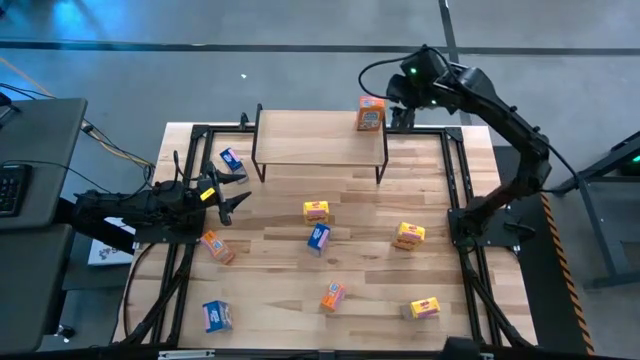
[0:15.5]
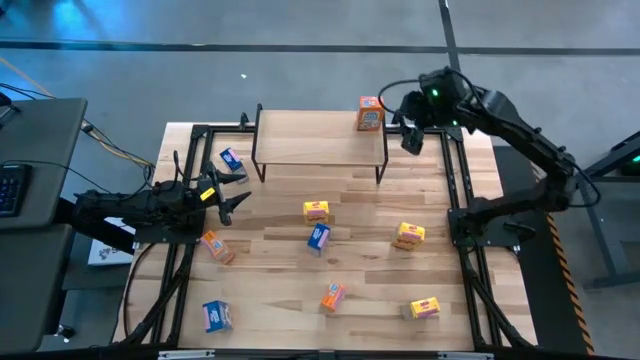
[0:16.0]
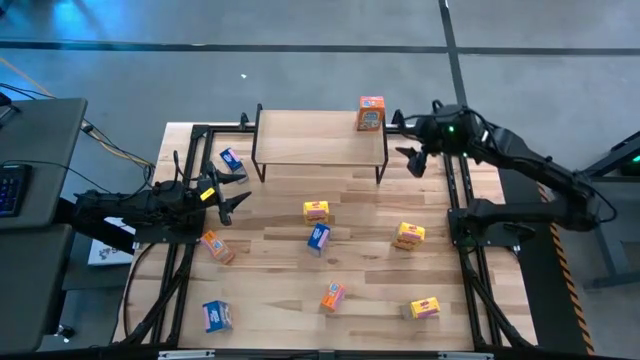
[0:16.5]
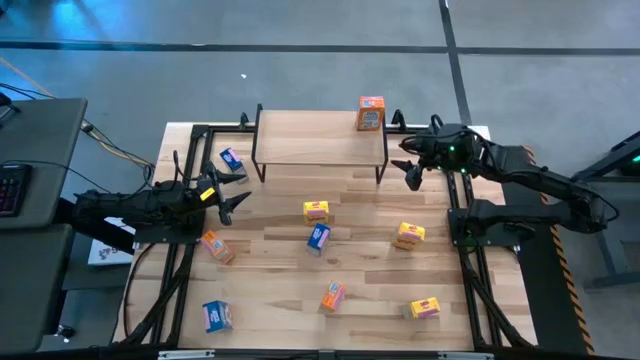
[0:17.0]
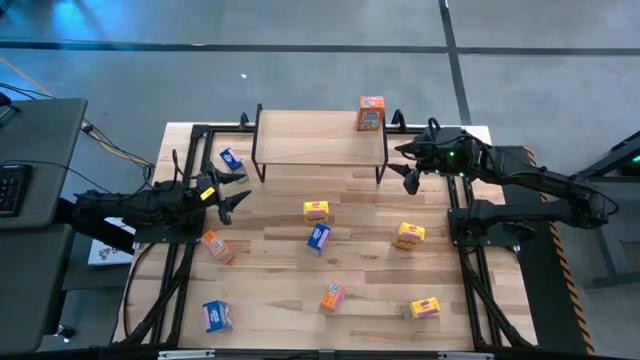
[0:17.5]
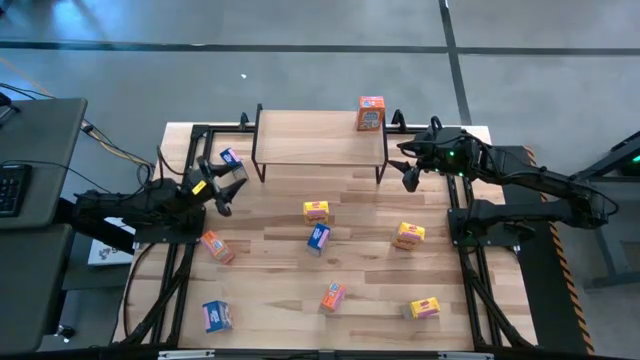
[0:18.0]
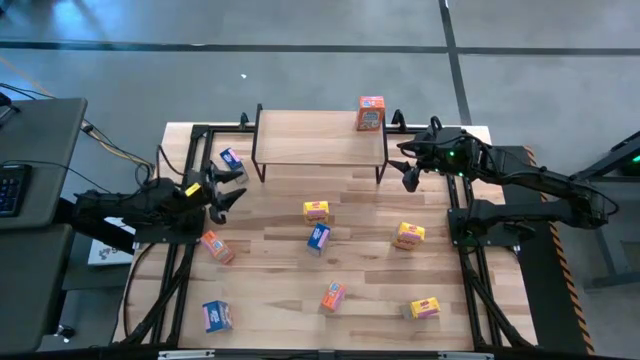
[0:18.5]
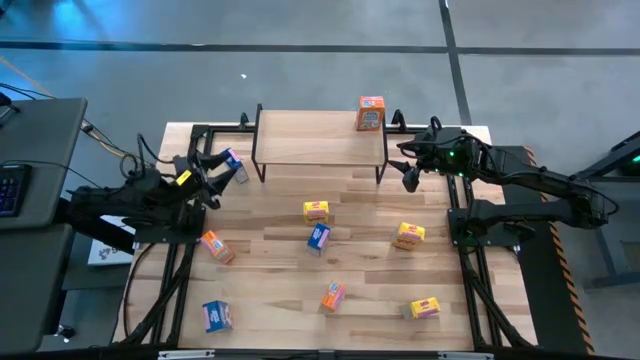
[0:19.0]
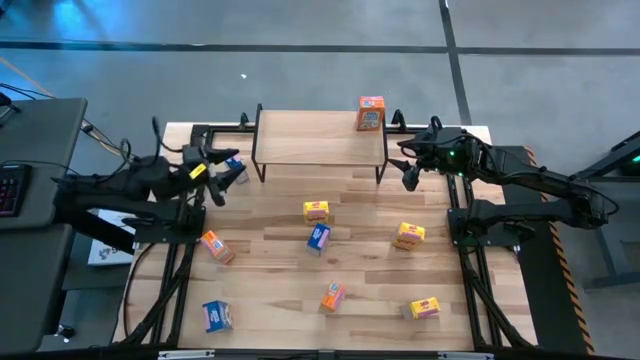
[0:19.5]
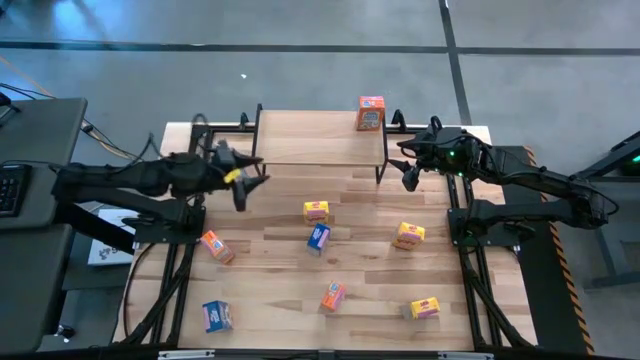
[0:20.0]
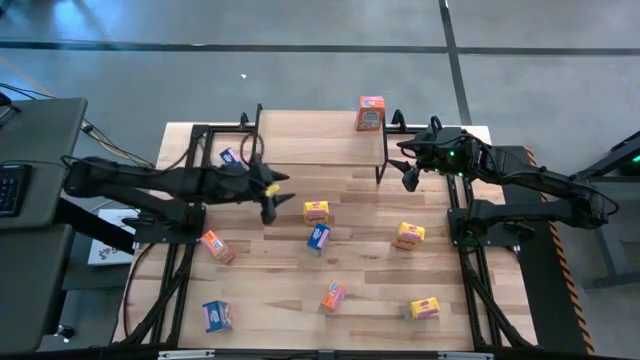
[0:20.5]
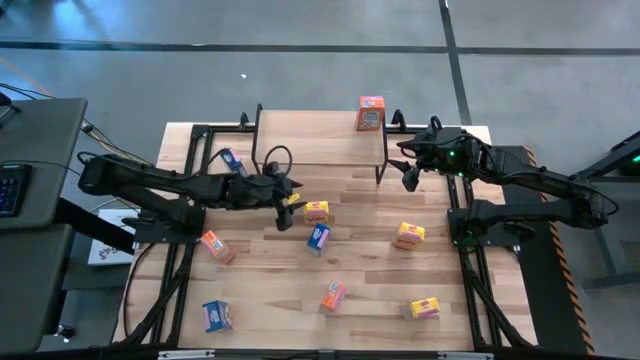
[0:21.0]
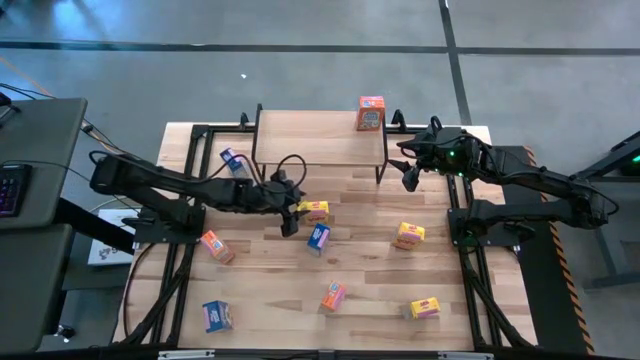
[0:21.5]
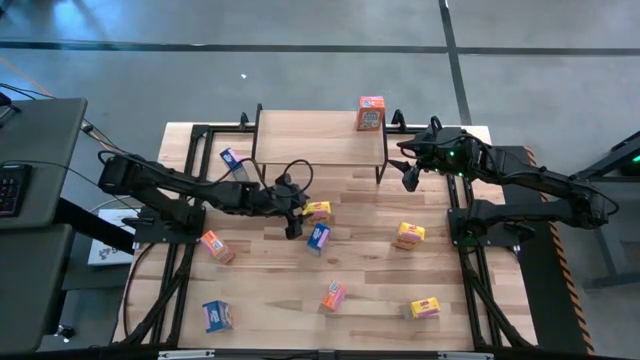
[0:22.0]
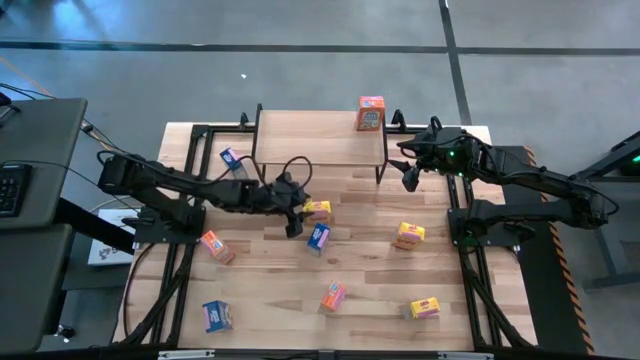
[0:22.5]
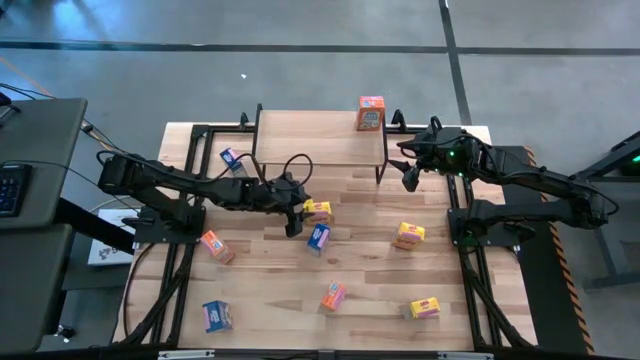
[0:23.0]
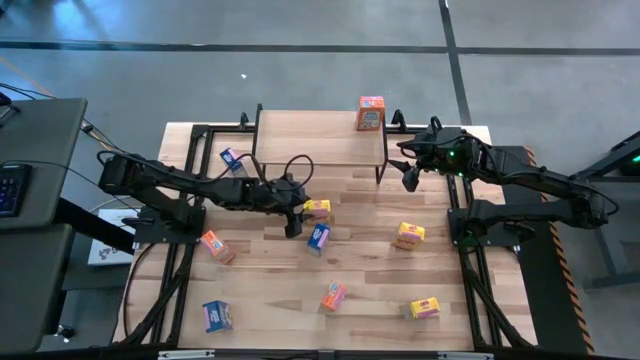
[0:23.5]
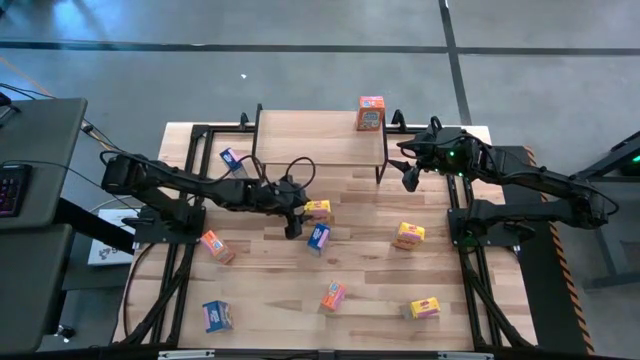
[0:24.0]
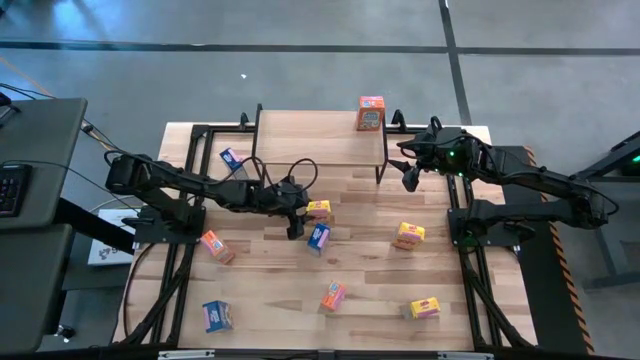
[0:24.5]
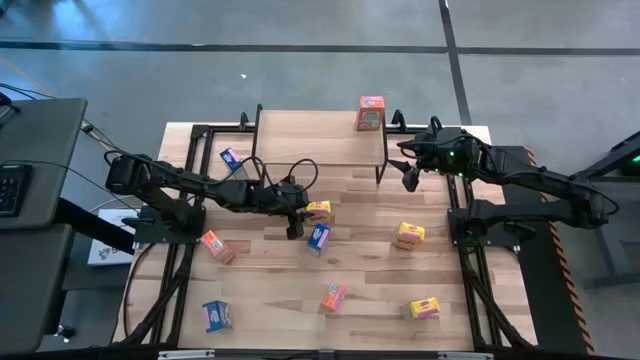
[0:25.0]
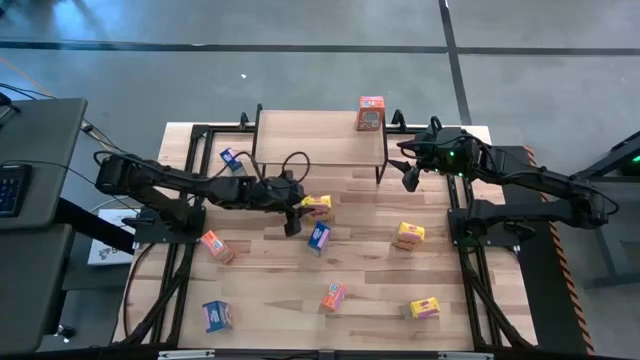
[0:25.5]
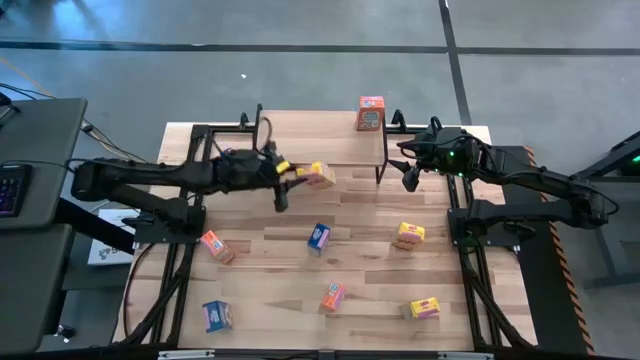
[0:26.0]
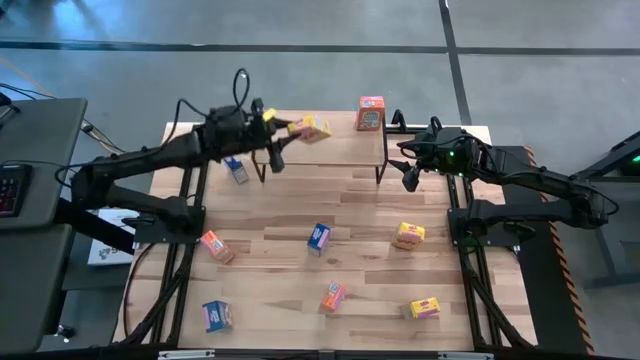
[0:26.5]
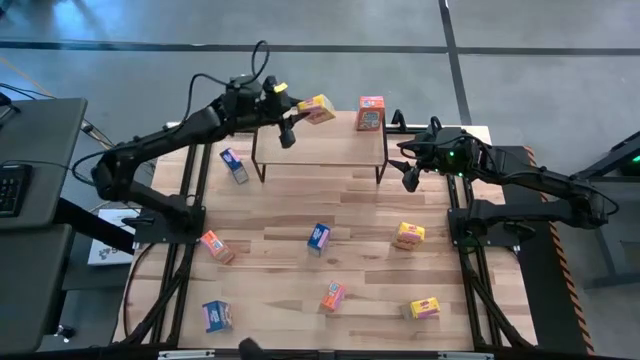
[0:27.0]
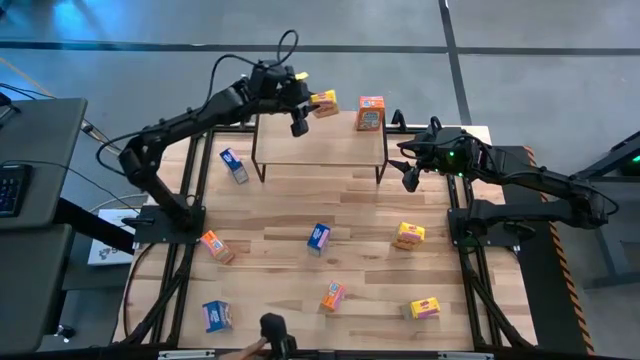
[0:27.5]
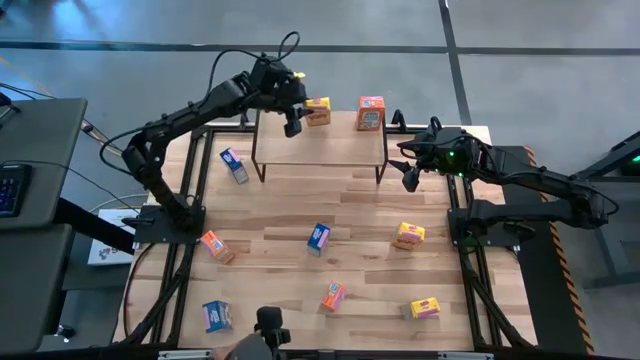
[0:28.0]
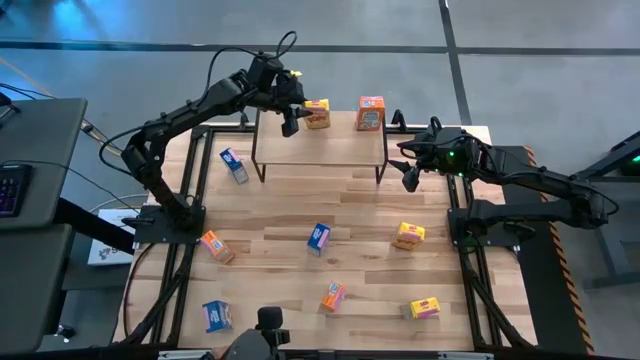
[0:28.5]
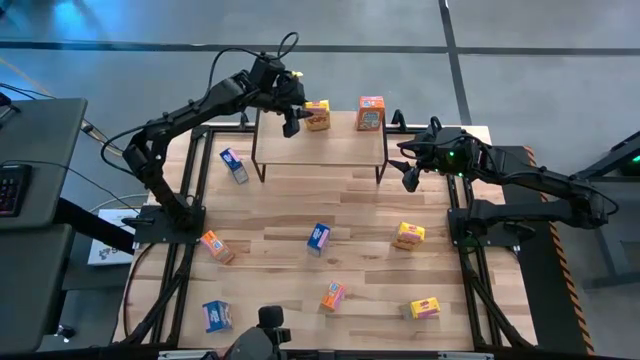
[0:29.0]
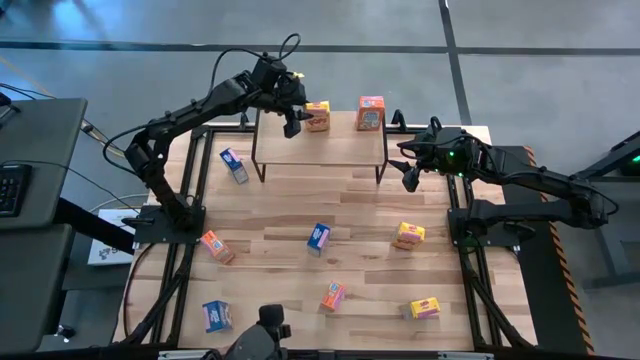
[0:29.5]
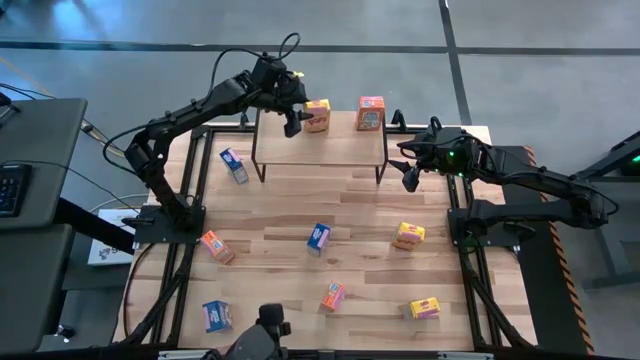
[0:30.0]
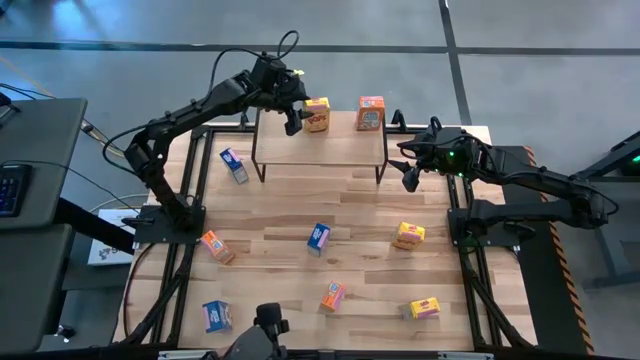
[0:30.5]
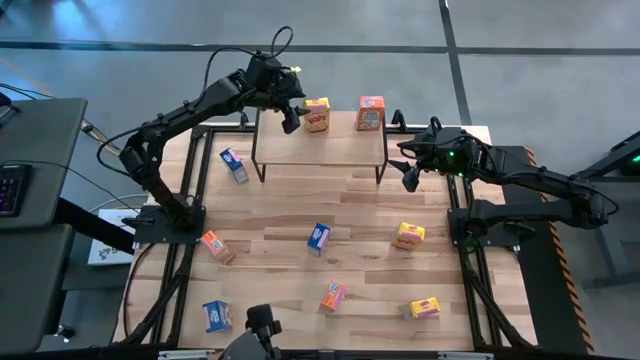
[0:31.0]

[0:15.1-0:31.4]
Task: Stack cereal on shelf
Put the top left yellow cereal box on the shelf

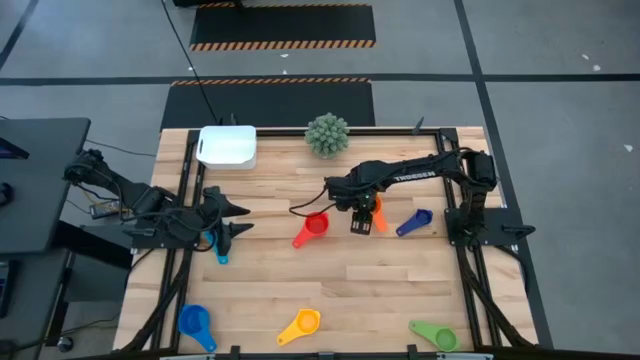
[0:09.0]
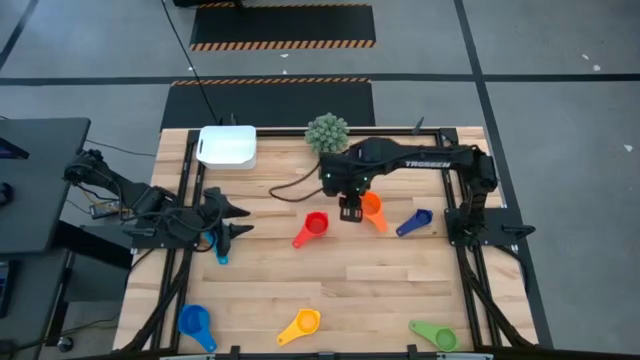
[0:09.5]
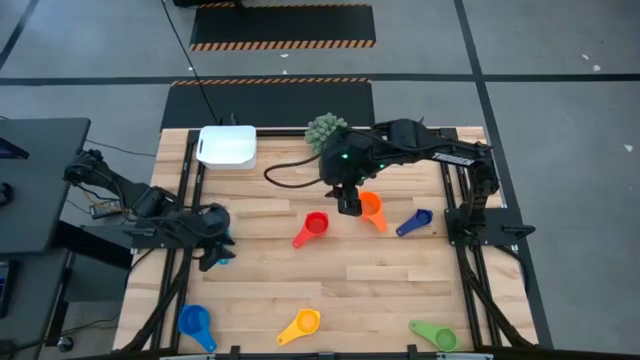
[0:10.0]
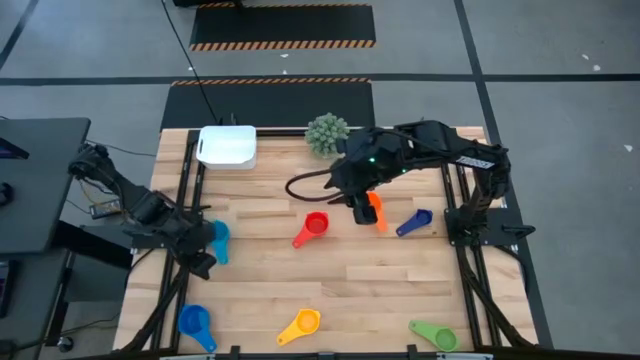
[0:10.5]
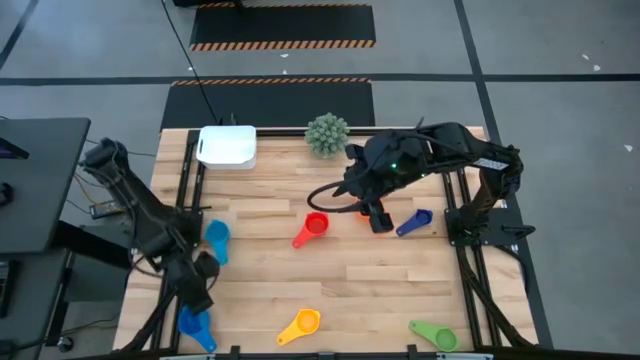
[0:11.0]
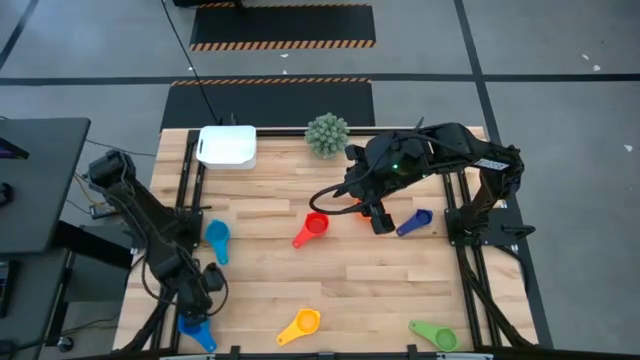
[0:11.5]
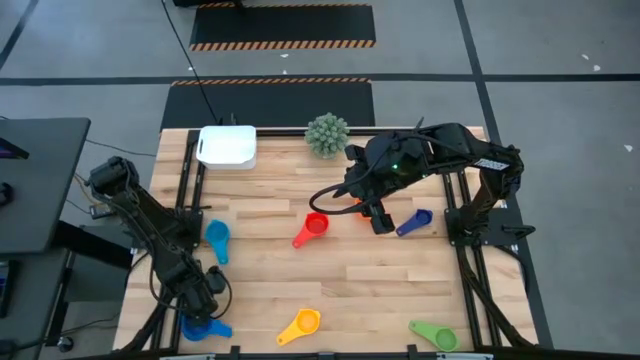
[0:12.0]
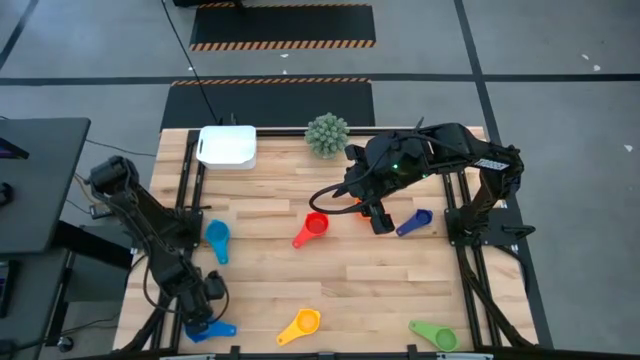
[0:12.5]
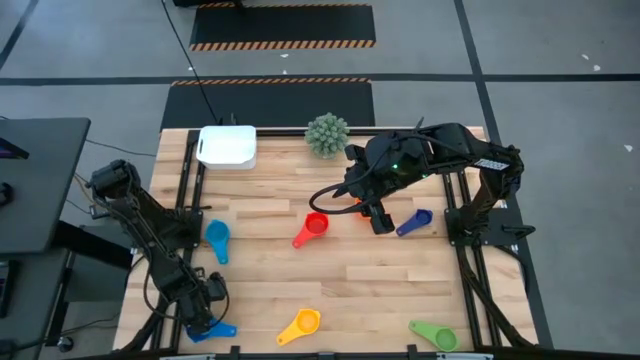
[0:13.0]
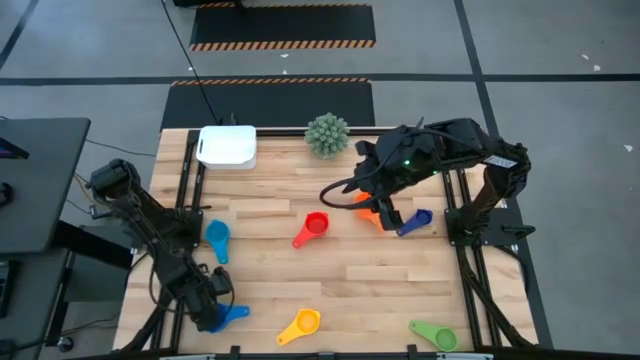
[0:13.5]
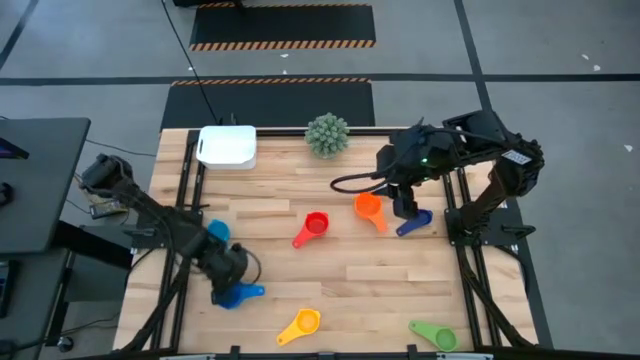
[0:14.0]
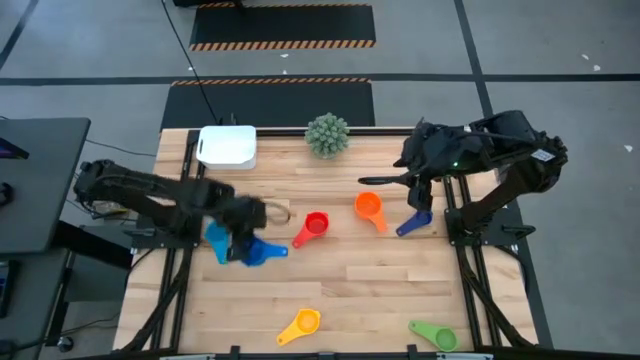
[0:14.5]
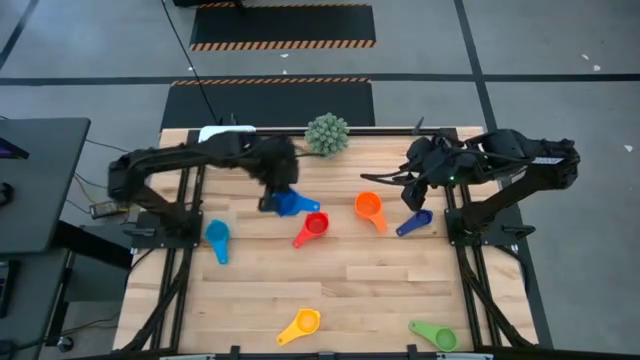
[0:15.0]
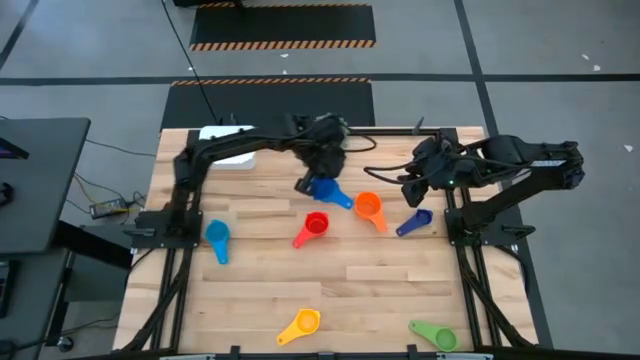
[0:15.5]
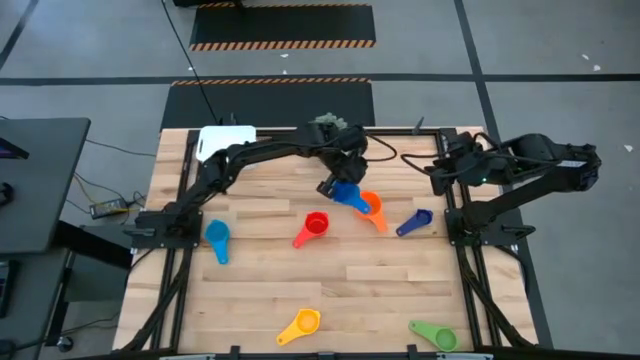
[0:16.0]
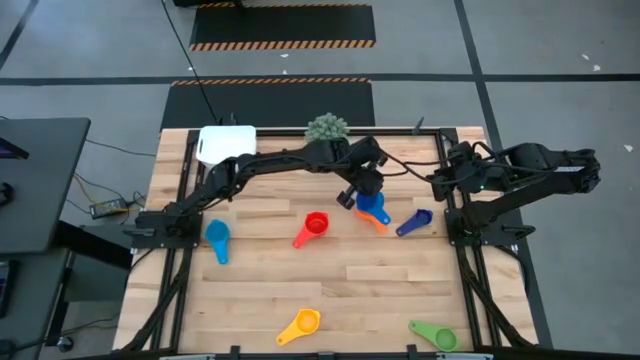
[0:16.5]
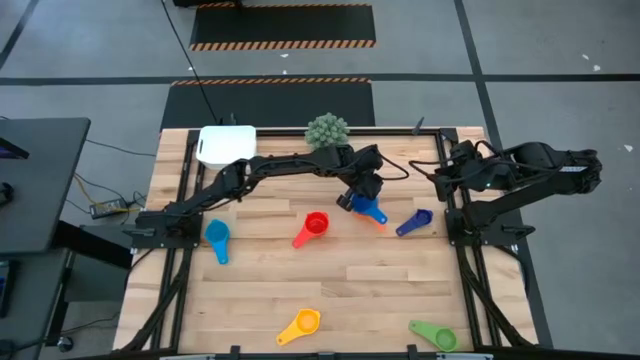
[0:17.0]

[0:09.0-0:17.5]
Task: Nest measuring cups in basket
Stack the blue measuring cup on top of the orange measuring cup
